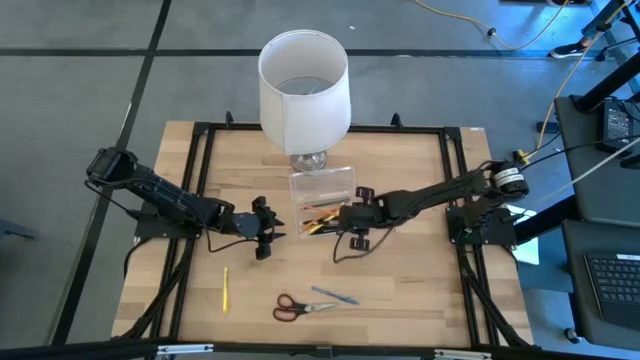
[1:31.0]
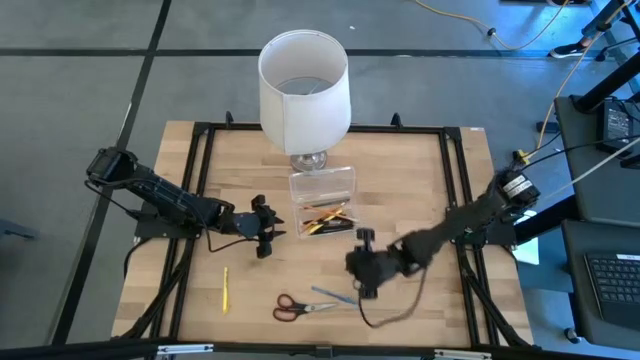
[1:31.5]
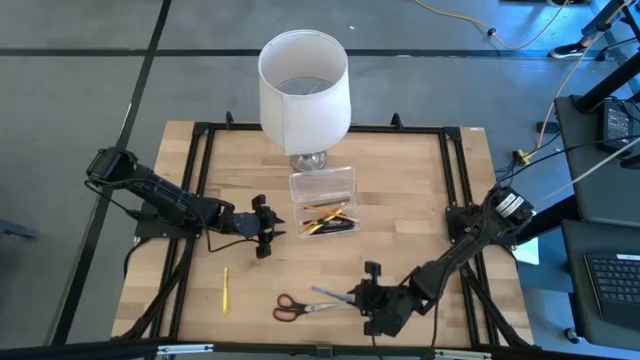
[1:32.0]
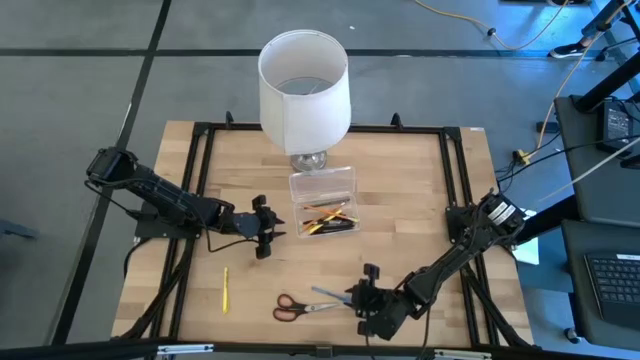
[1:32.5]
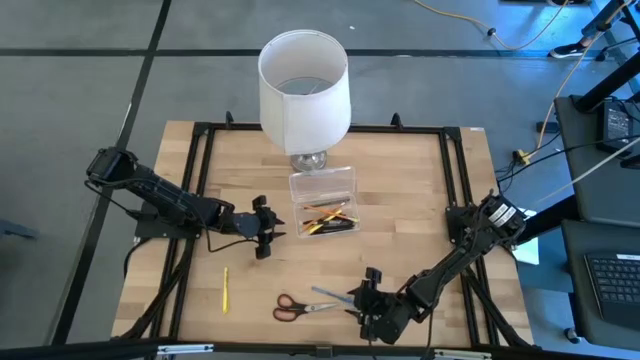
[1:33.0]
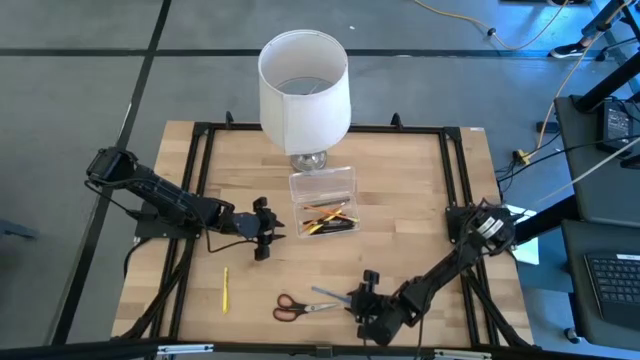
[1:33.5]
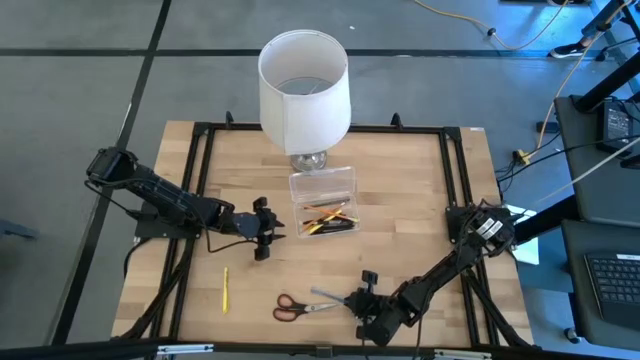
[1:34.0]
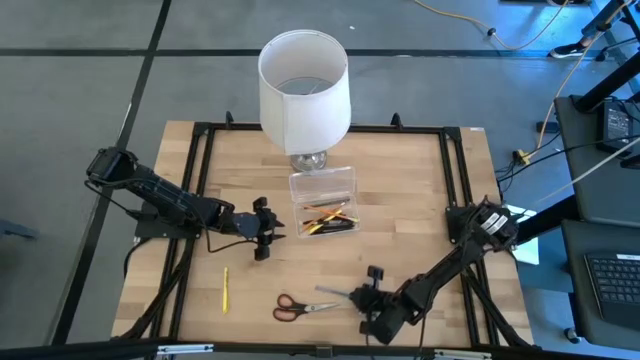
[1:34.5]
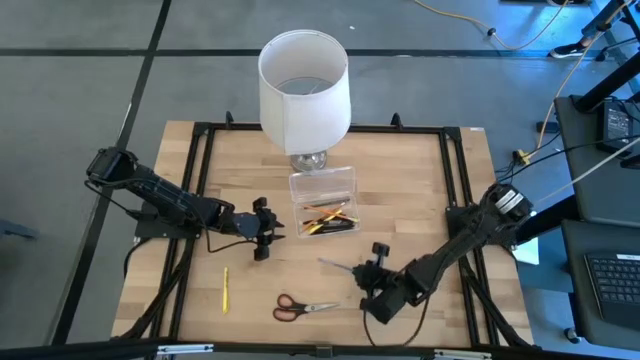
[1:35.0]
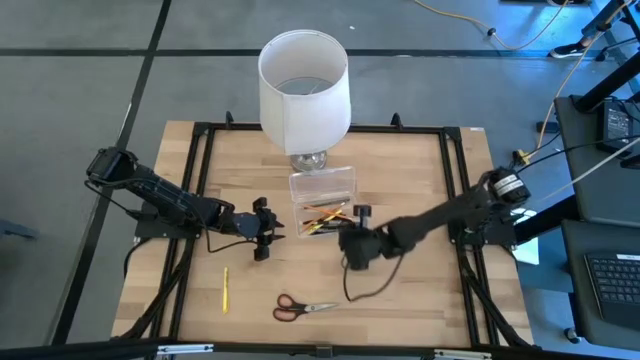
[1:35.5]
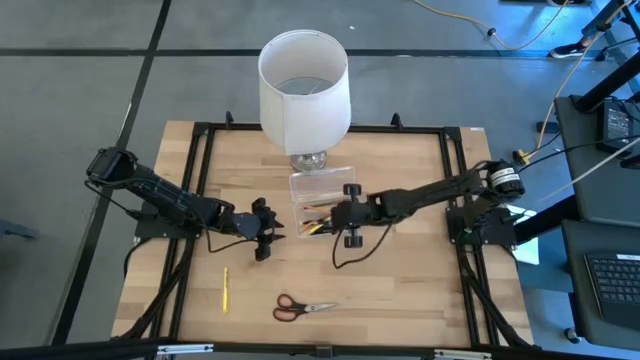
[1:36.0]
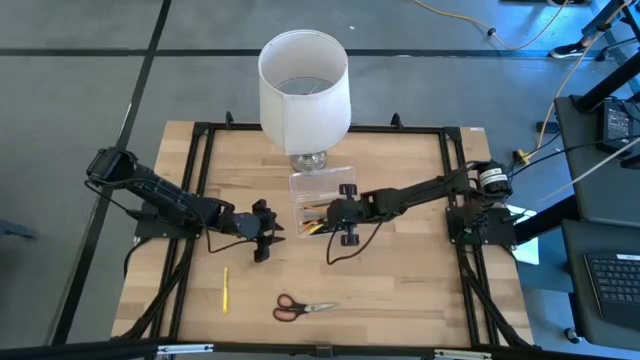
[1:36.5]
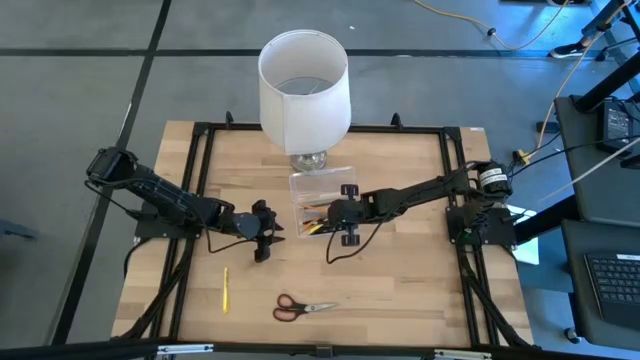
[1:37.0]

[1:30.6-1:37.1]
Task: Pick & place school supplies into a supply box
Put the blue pen into the transparent supply box

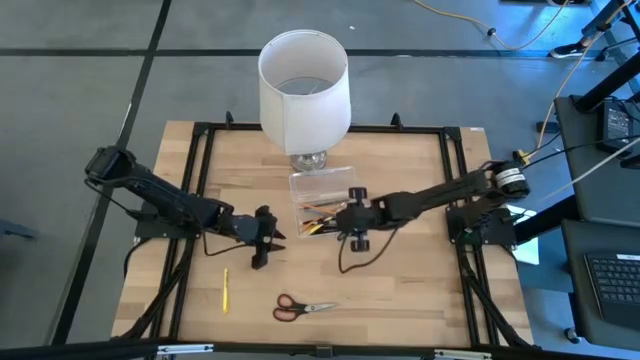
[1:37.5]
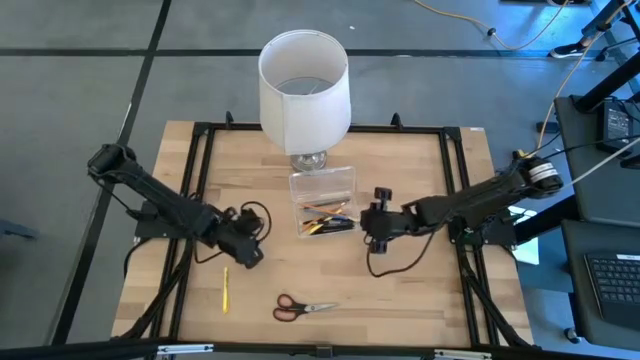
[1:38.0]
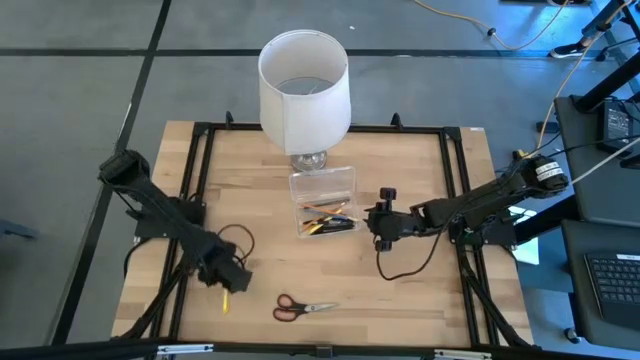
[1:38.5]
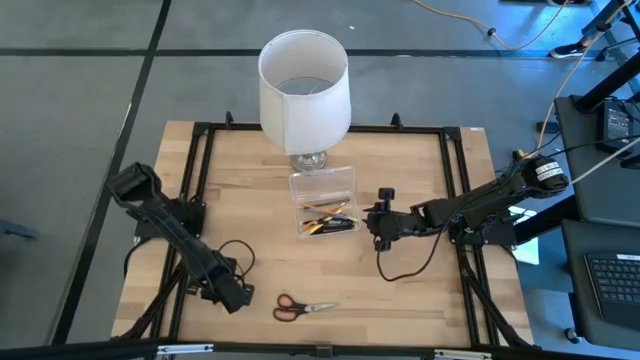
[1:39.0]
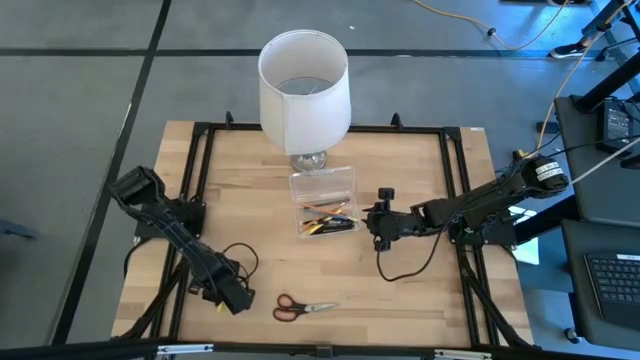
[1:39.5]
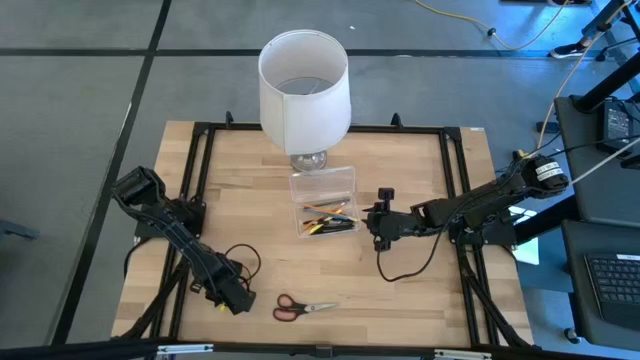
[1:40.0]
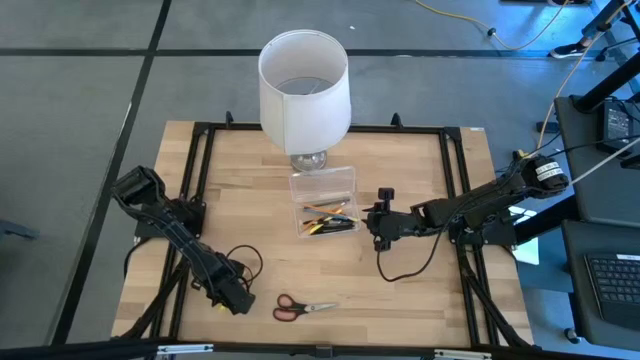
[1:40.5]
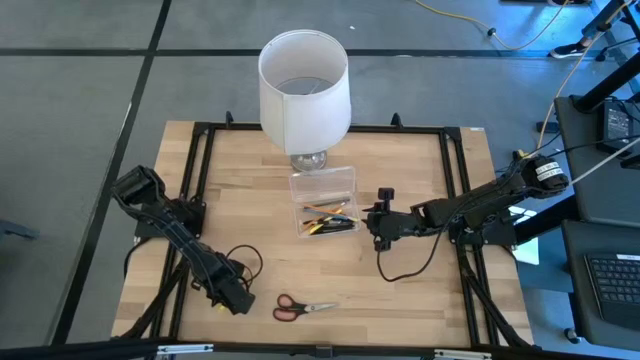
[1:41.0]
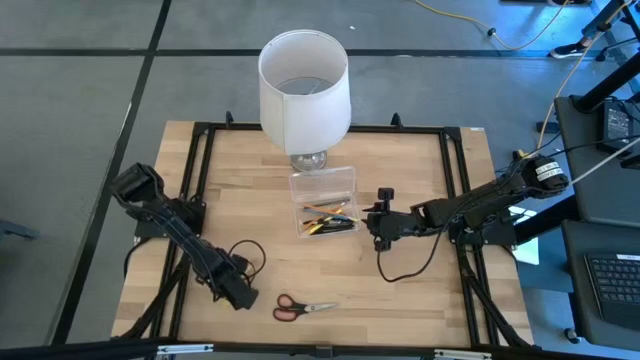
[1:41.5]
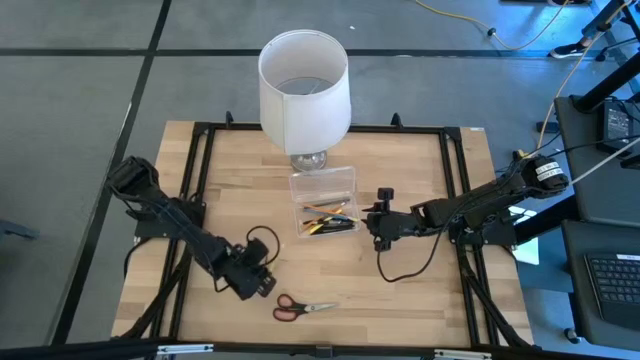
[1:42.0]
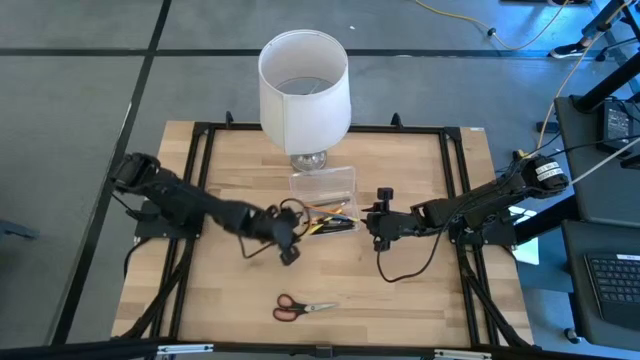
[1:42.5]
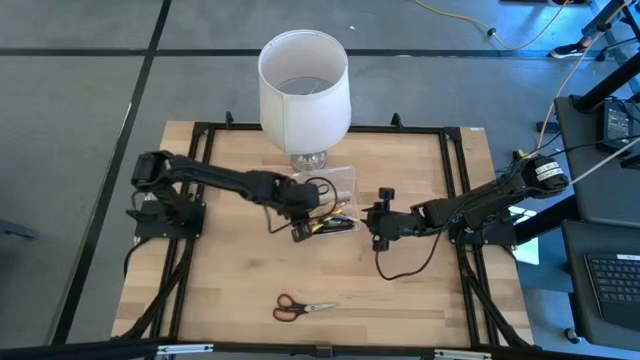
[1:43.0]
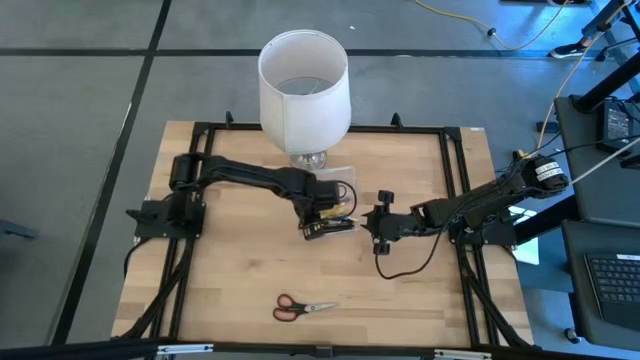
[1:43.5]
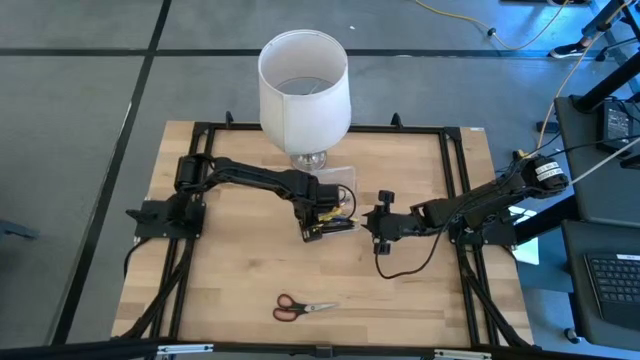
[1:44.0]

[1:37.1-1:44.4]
Put the yellow pen into the transparent supply box

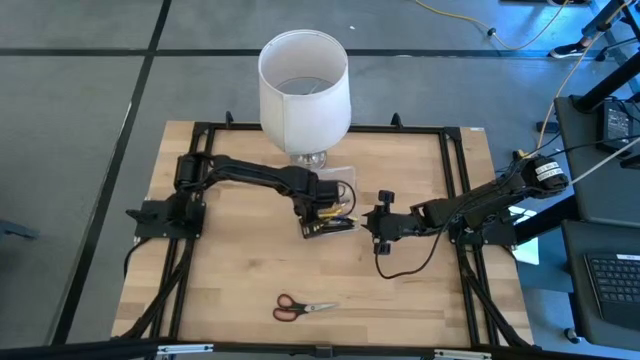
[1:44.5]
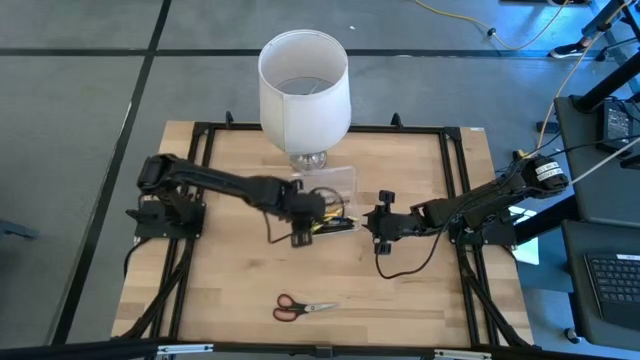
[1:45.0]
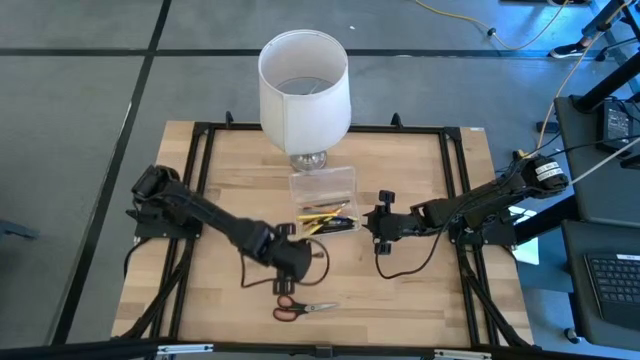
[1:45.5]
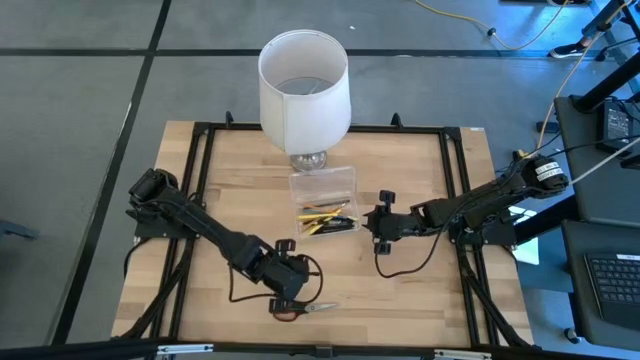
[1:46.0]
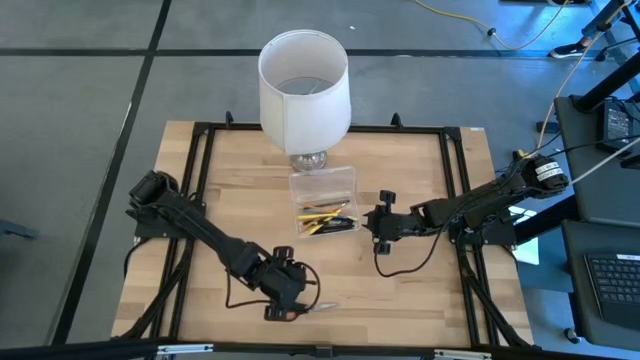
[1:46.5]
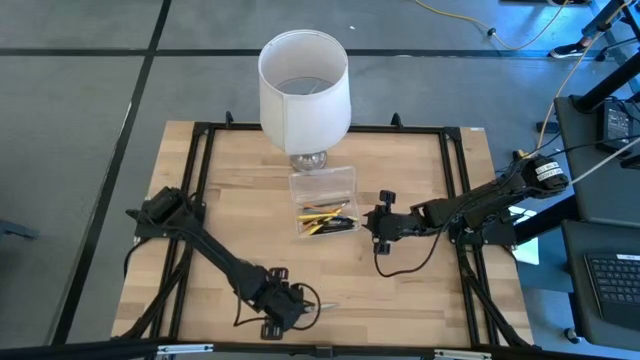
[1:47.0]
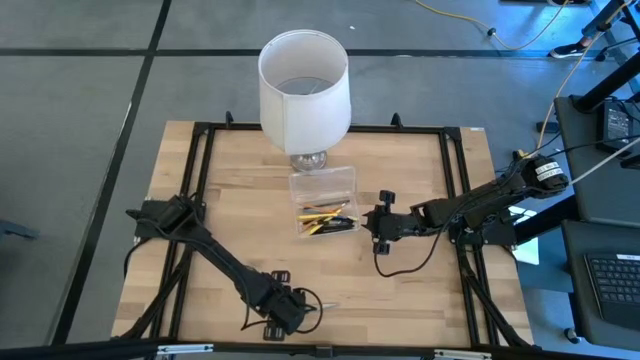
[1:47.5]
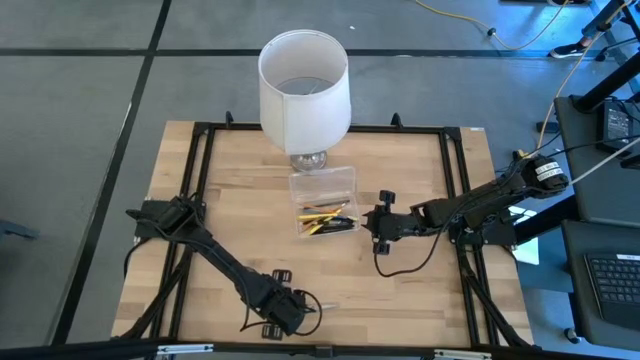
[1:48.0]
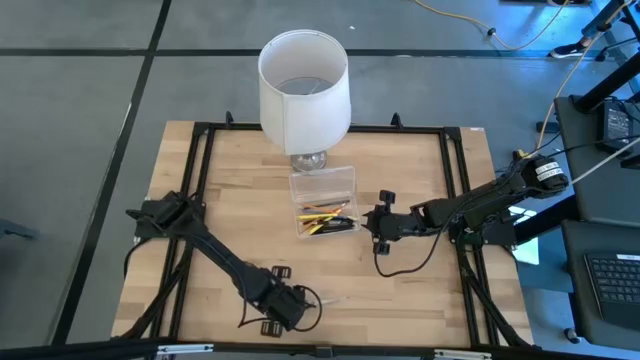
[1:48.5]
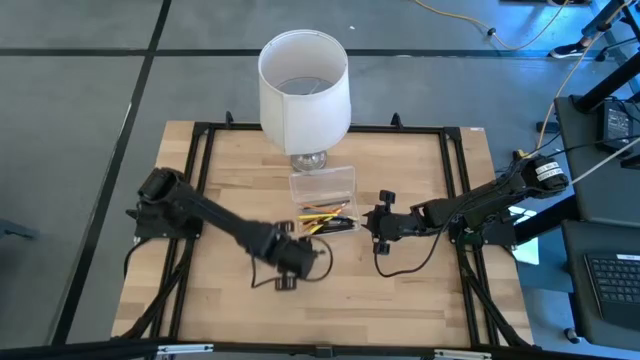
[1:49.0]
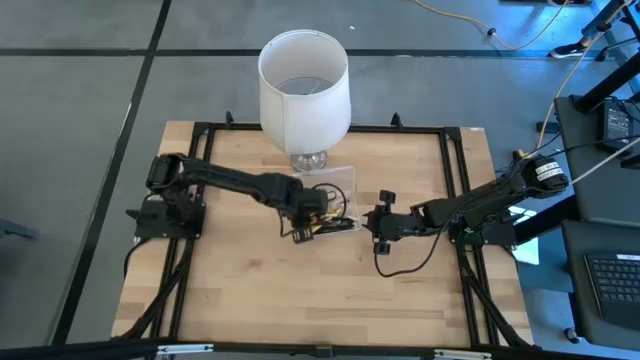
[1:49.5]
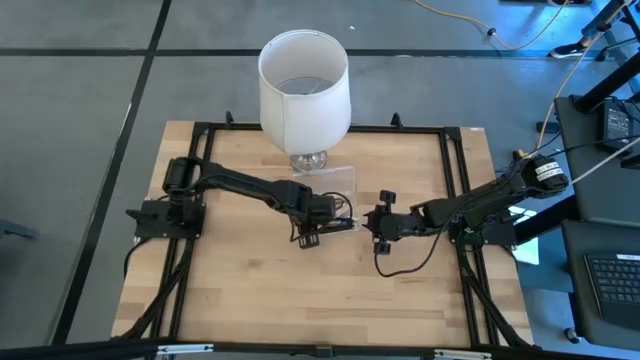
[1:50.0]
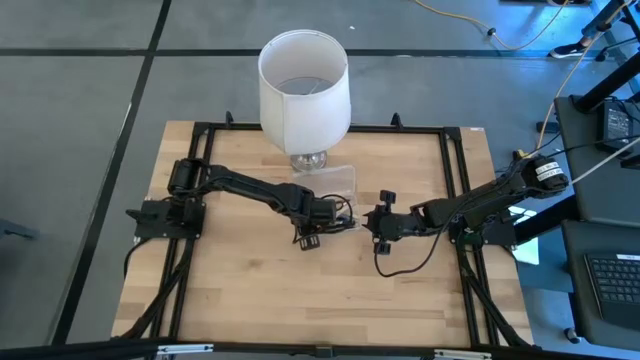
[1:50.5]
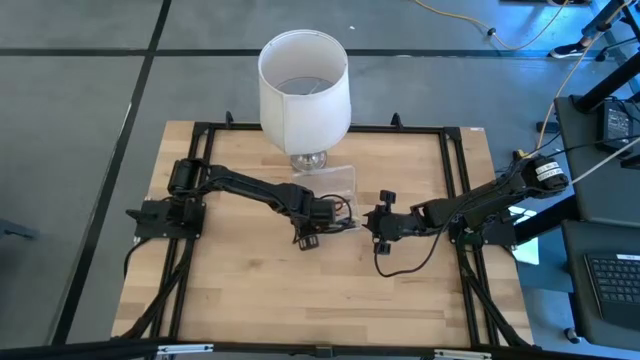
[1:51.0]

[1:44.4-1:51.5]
Put the black scissors into the transparent supply box
